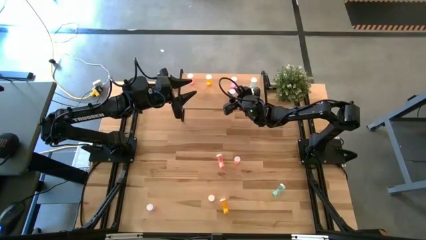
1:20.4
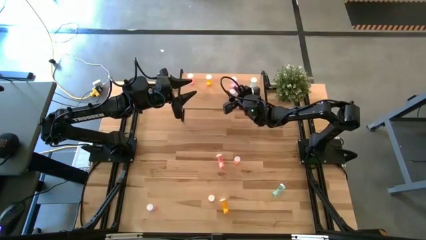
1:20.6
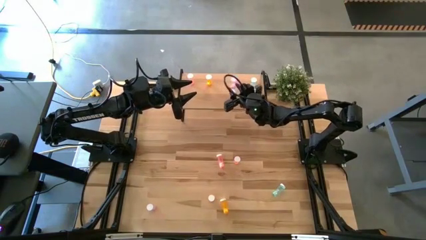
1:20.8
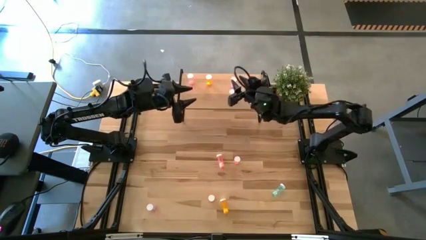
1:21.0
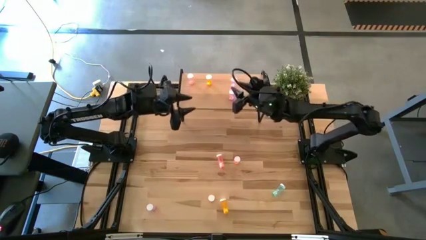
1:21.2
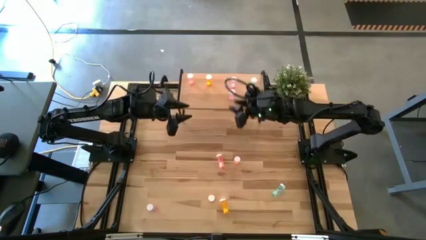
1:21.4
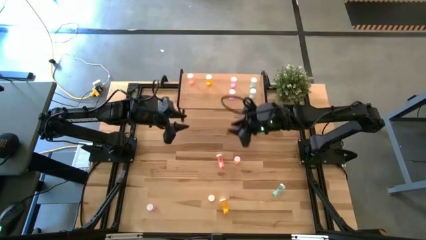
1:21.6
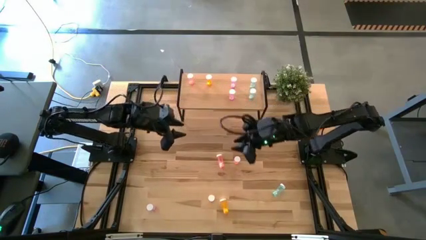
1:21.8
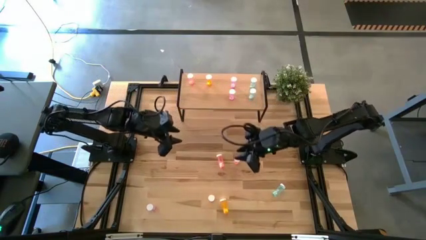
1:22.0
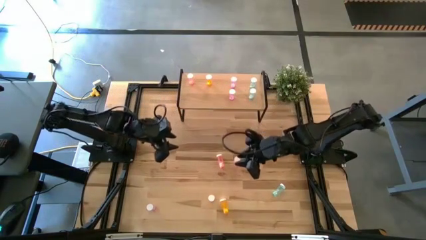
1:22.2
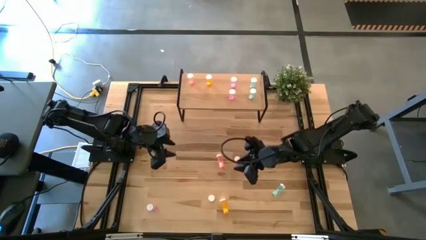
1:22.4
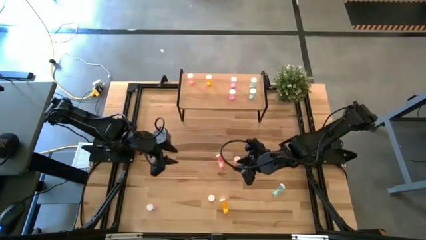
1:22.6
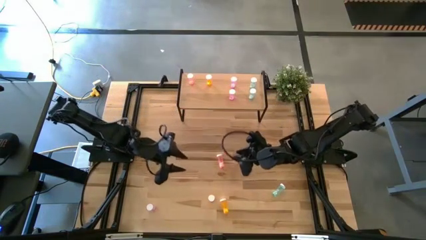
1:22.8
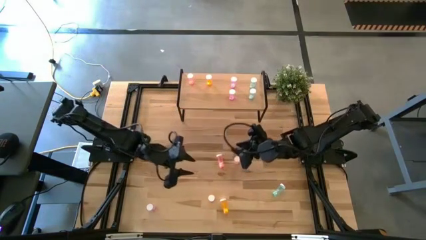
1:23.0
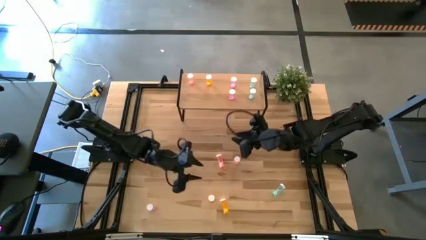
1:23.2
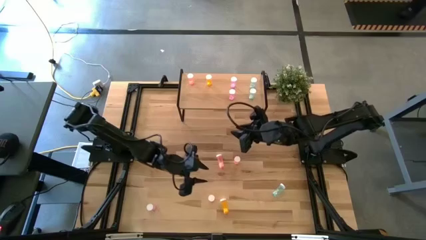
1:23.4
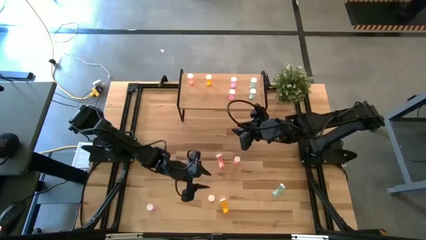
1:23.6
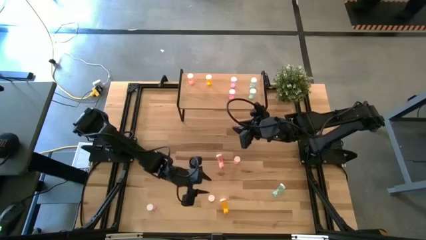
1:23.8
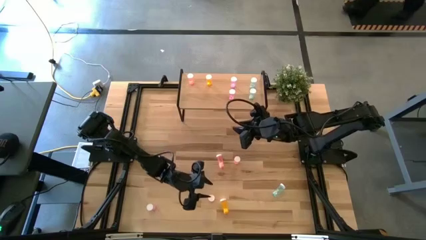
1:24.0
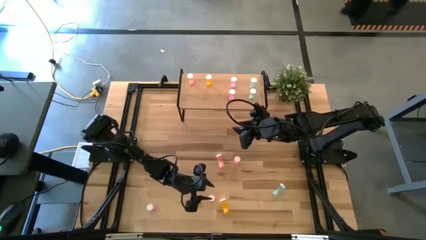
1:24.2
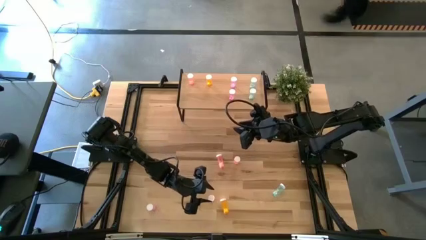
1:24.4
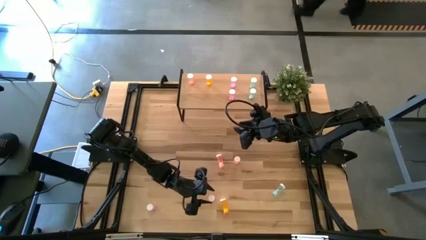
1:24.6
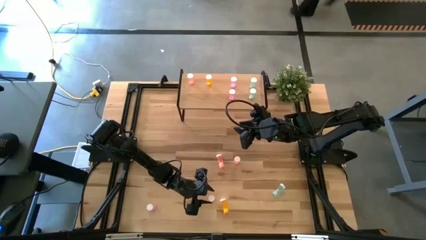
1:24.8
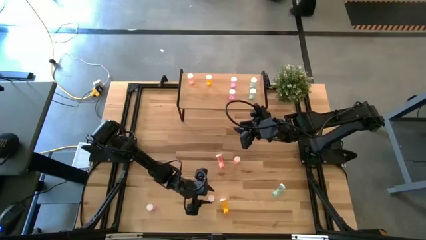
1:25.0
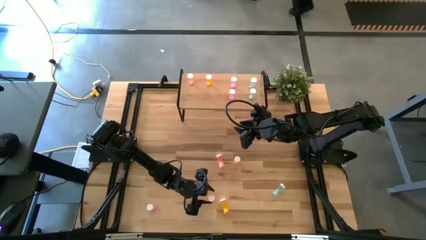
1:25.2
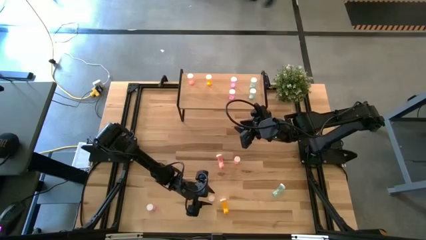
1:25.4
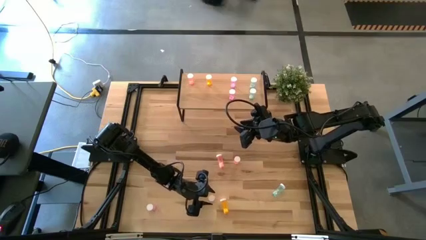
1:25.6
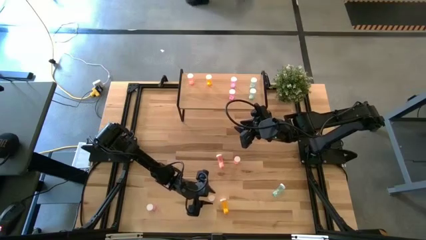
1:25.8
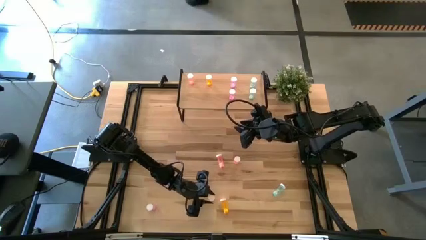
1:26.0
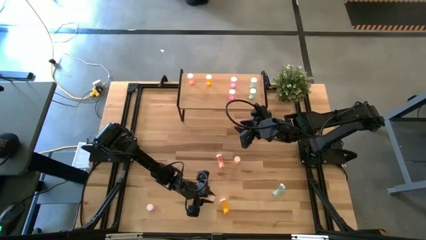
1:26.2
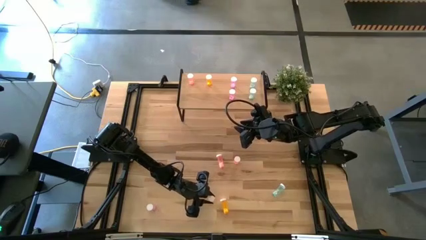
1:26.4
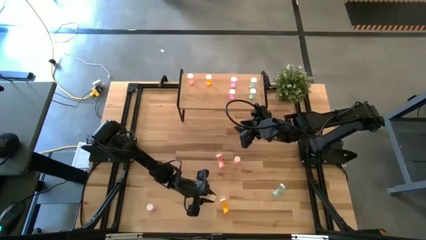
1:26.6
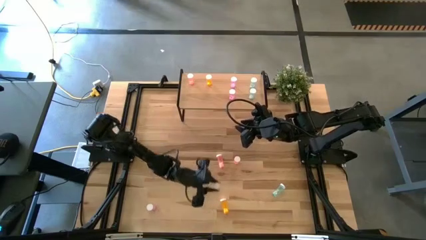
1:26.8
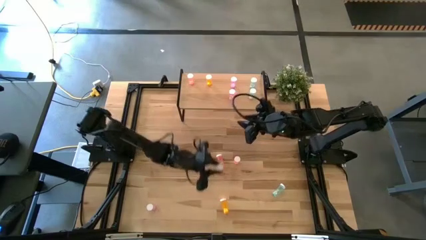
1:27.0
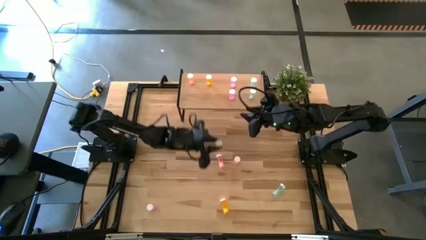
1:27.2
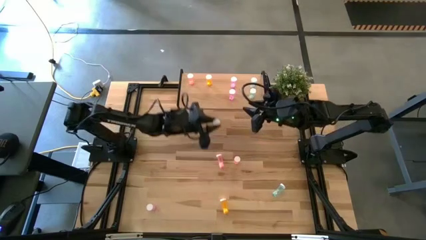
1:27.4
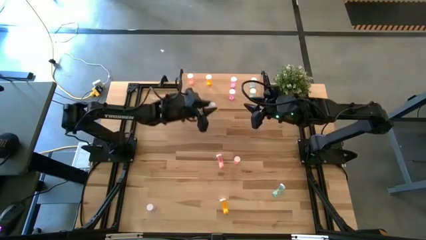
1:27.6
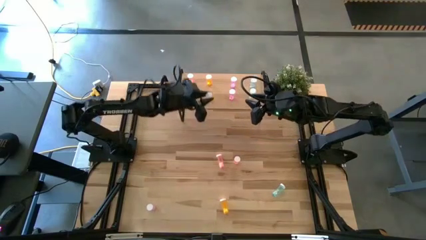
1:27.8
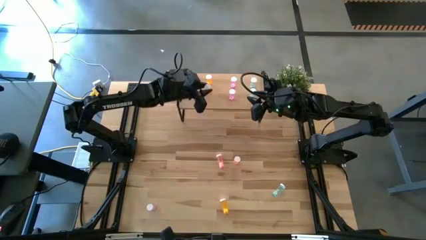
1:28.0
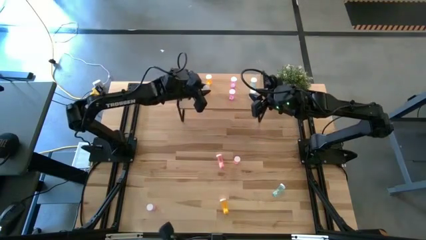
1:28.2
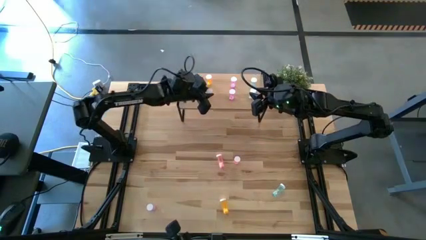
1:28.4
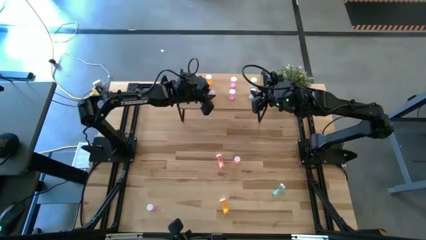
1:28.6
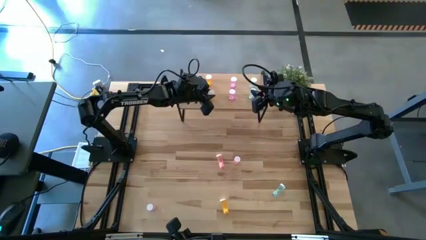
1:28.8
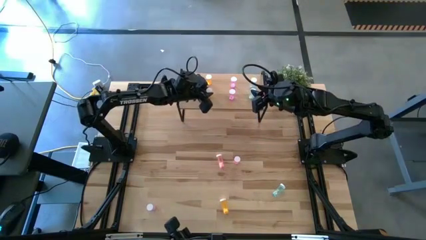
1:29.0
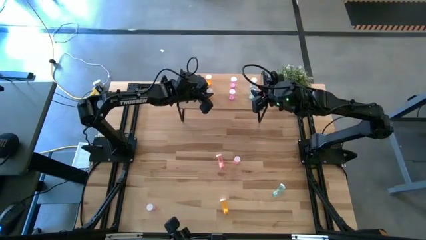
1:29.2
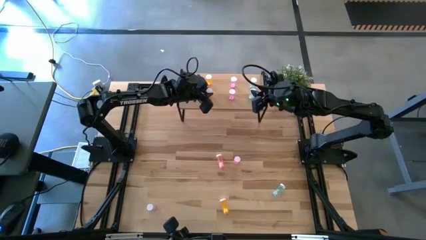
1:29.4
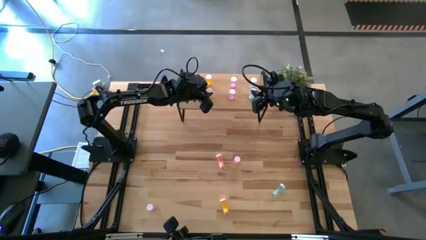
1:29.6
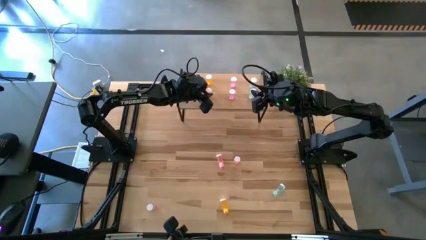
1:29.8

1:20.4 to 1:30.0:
Task: Pick and place medicine bottles onto shelf by color
Put the left orange pill bottle on the shelf aligned with the other orange pill bottle

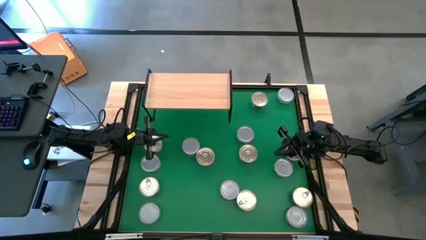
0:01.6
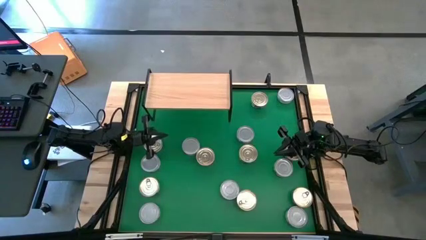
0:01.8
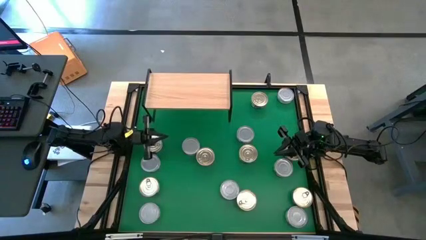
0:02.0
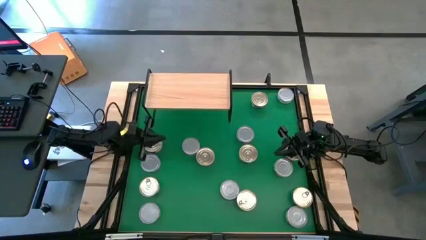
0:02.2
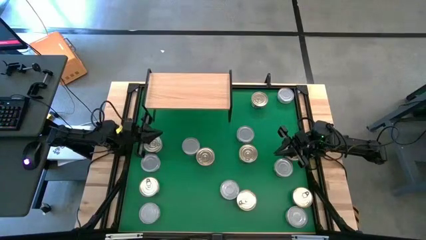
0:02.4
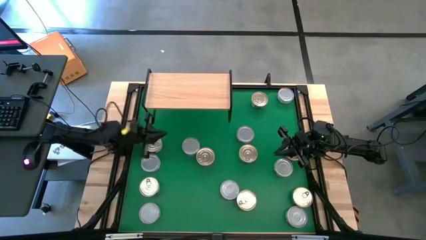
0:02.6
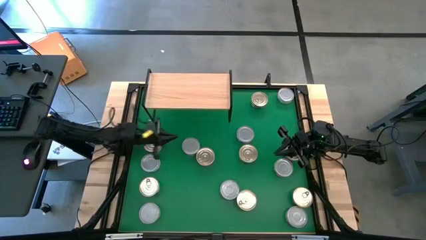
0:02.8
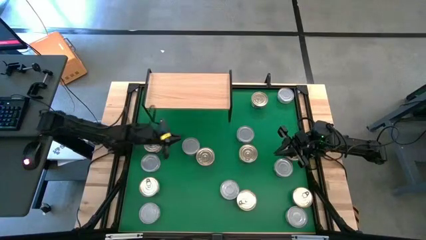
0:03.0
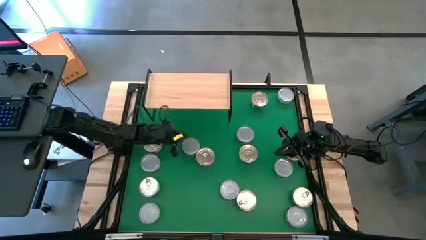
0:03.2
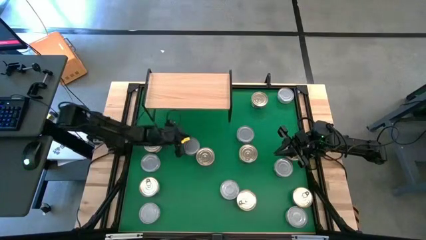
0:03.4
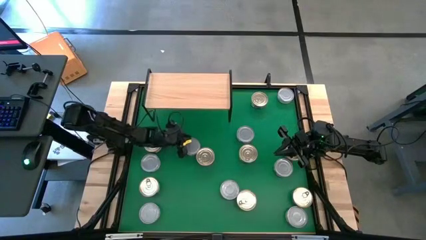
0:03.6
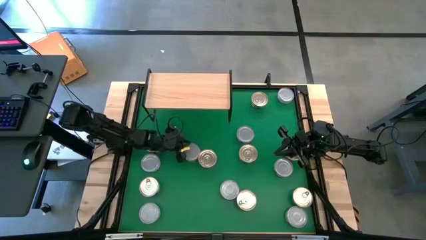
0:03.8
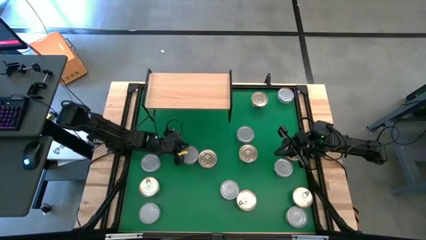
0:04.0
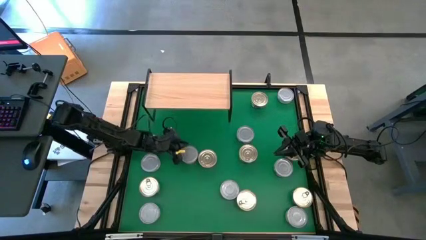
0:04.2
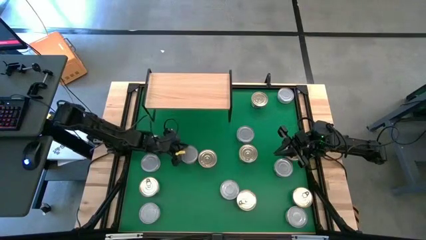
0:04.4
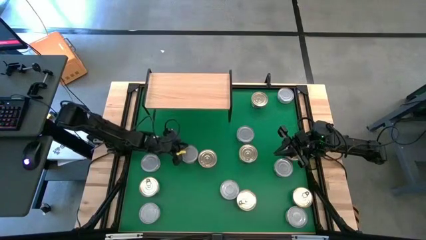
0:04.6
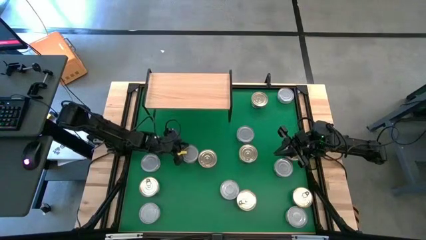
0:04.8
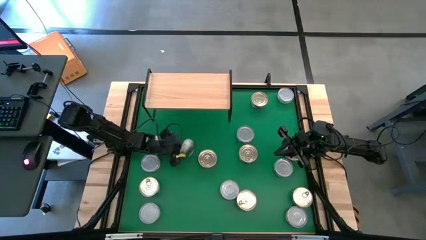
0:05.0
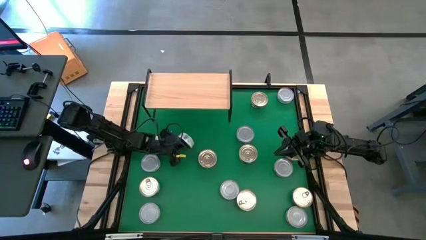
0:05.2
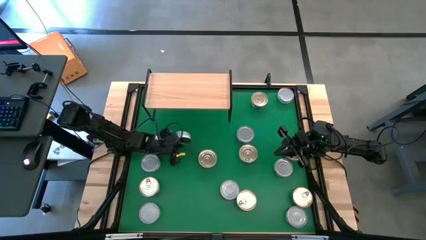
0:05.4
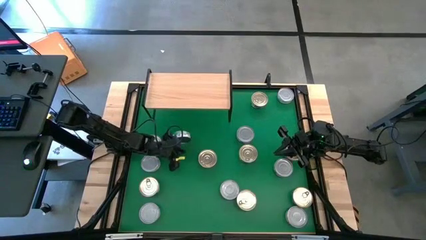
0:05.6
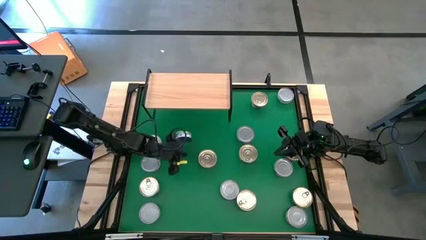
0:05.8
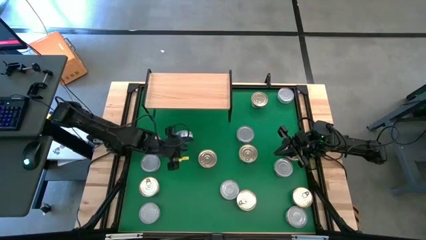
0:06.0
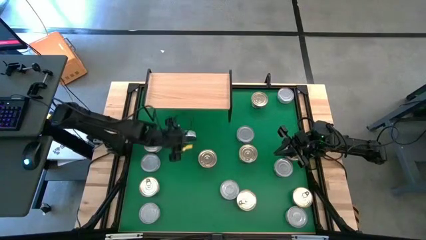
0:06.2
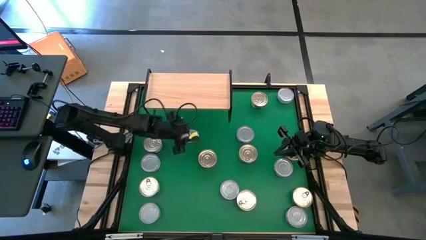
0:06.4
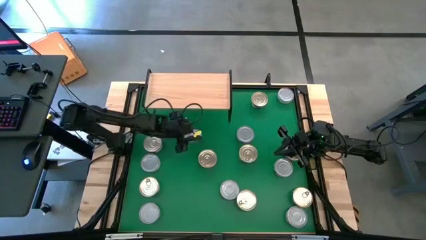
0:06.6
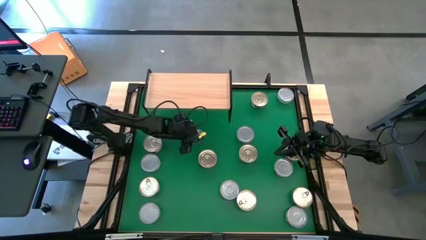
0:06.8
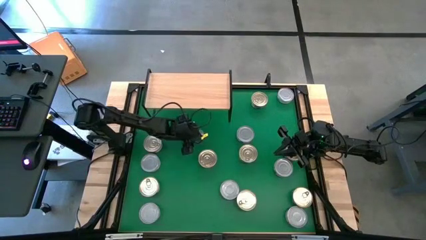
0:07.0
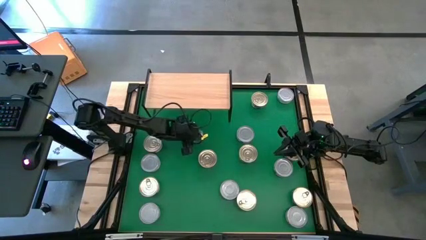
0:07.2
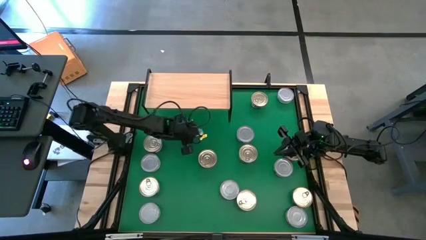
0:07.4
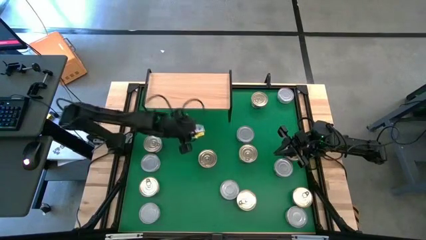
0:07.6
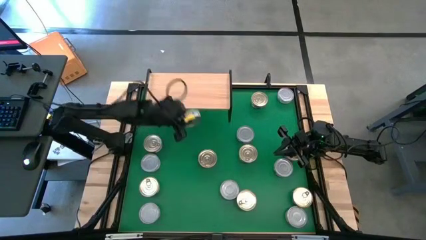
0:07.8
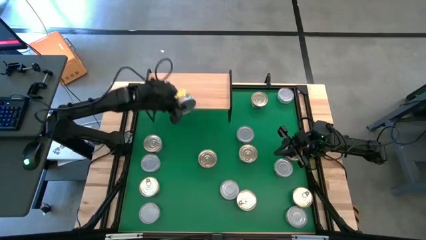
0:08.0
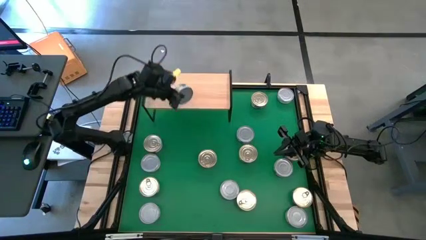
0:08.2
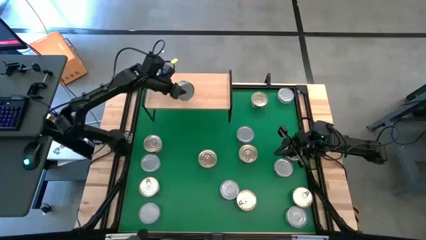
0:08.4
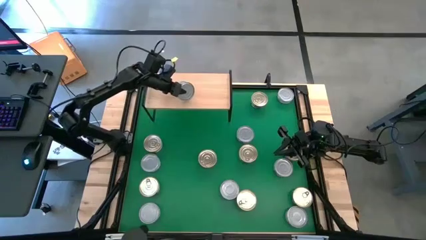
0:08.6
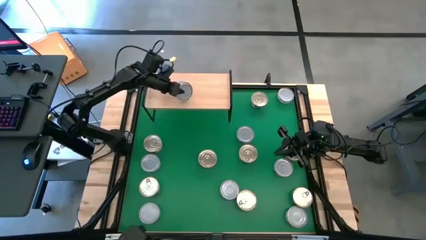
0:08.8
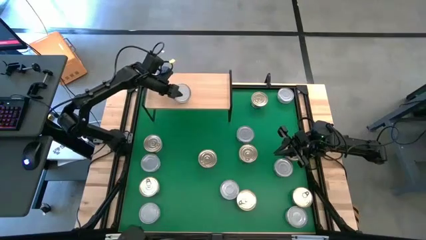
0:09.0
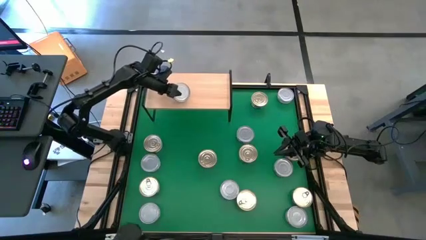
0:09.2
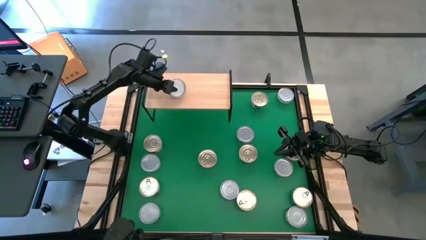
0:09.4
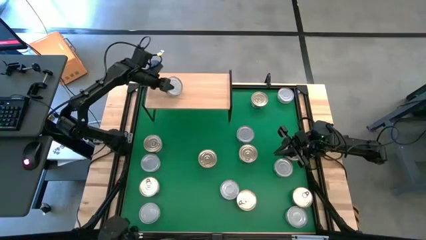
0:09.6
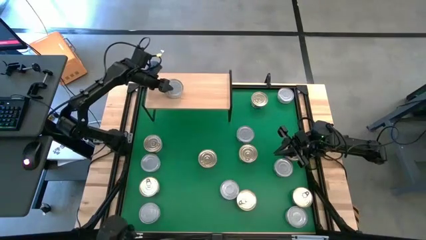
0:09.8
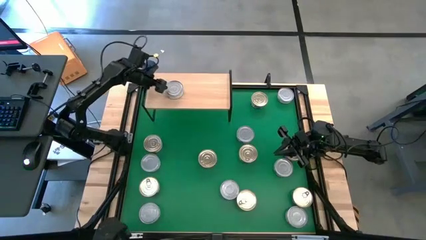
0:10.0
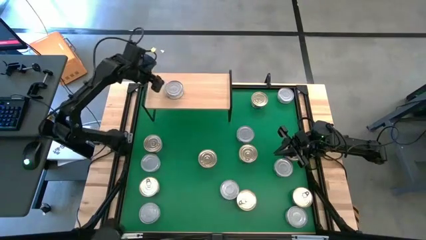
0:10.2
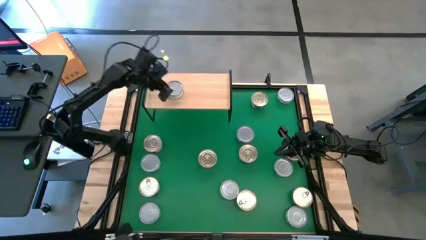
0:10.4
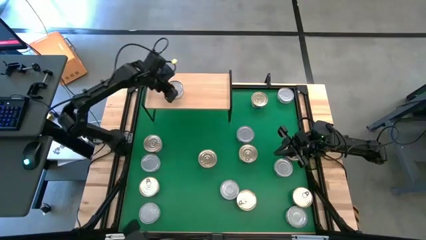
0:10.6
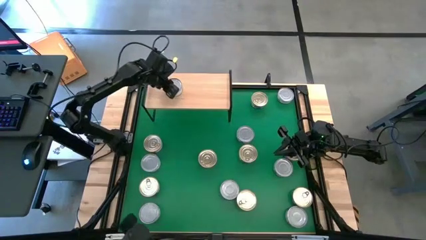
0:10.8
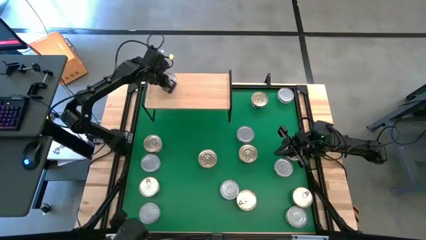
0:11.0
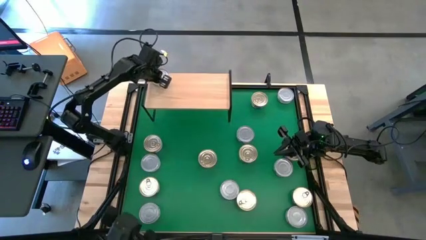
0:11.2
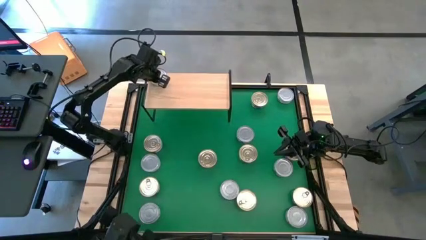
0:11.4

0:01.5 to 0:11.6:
Task: Stack canned seafood by type on shelf
Put the green tuna can on the shelf
